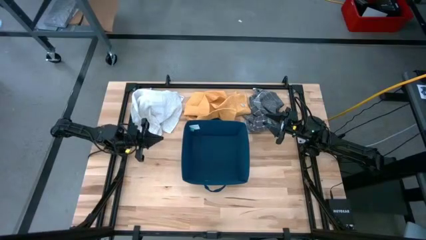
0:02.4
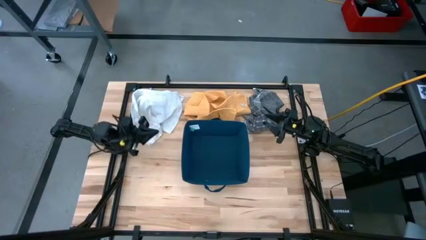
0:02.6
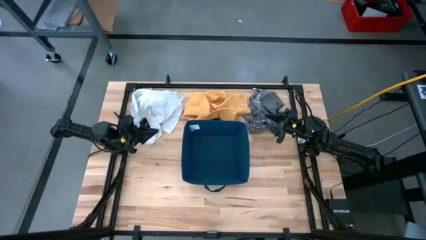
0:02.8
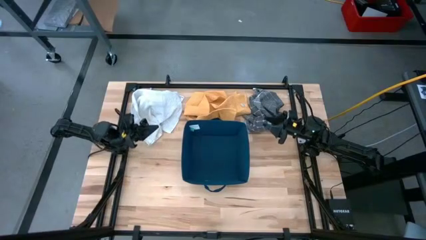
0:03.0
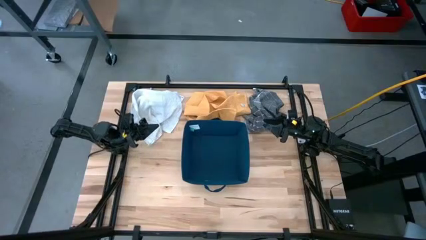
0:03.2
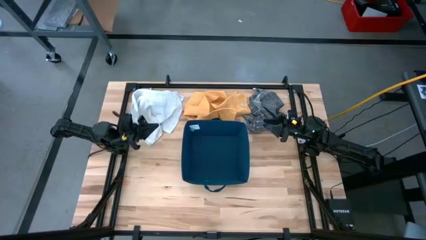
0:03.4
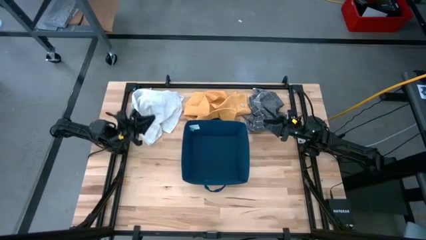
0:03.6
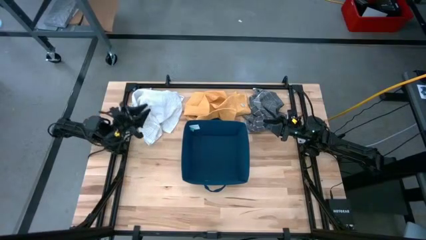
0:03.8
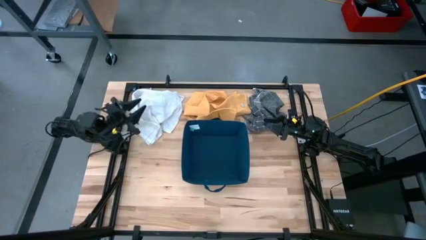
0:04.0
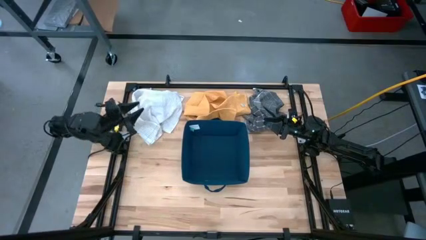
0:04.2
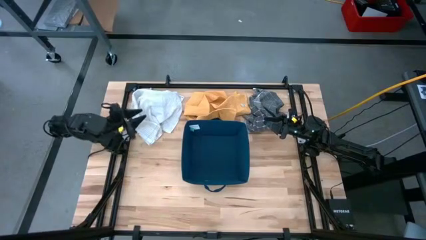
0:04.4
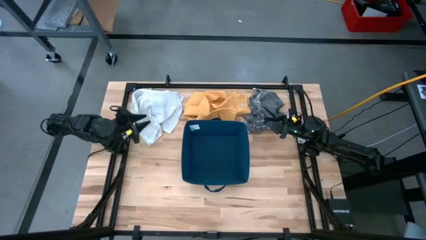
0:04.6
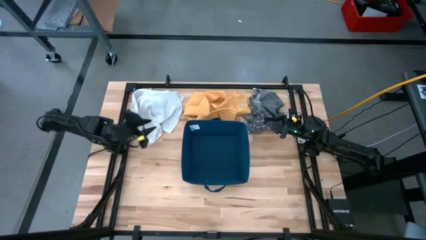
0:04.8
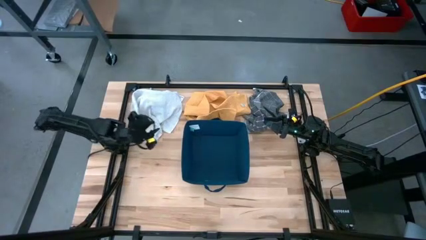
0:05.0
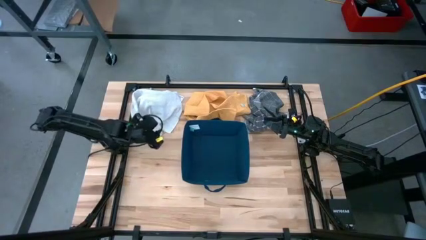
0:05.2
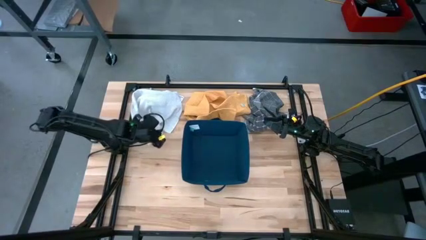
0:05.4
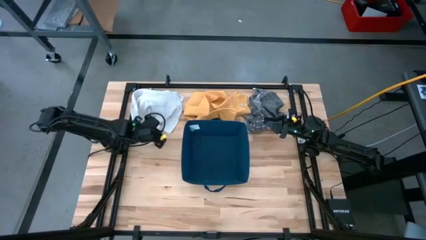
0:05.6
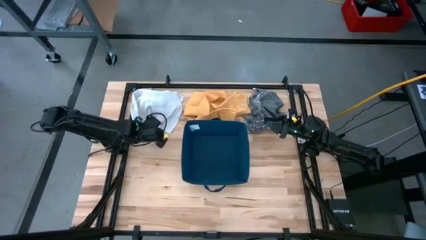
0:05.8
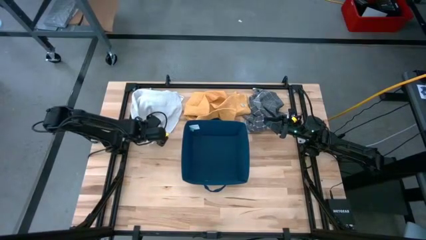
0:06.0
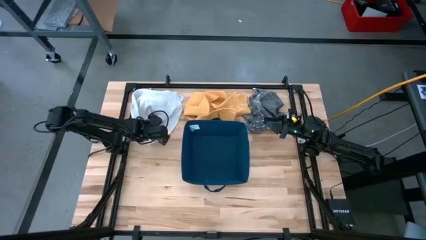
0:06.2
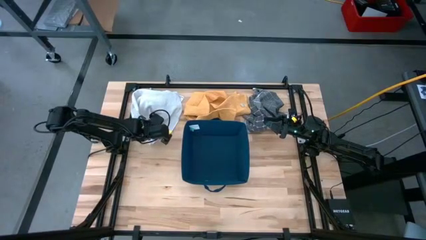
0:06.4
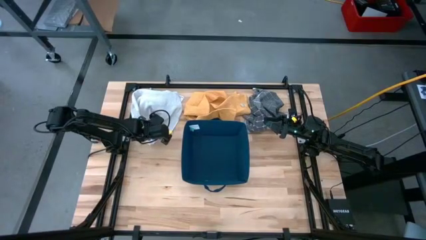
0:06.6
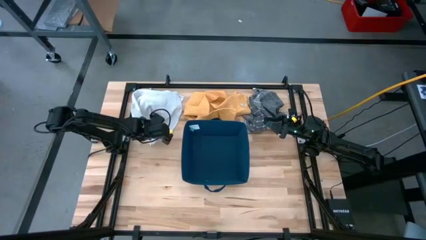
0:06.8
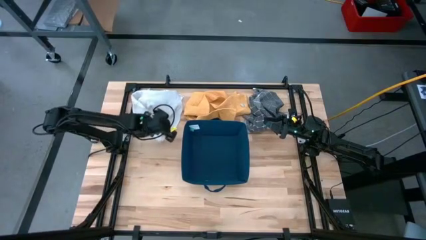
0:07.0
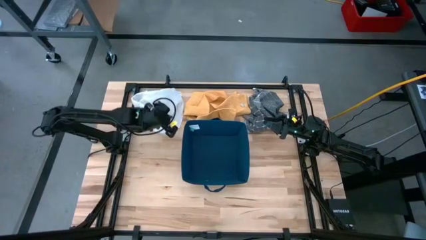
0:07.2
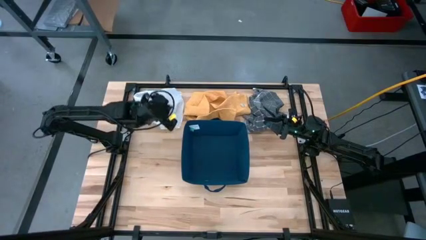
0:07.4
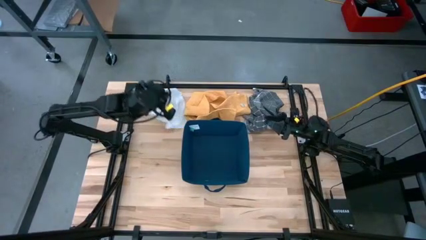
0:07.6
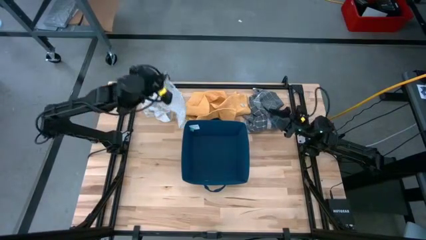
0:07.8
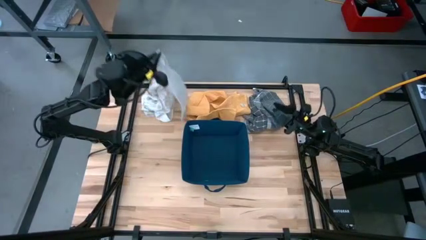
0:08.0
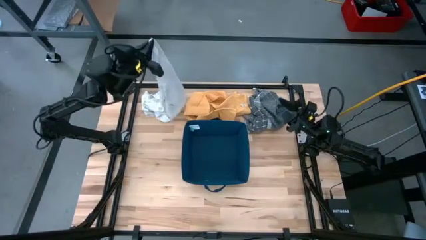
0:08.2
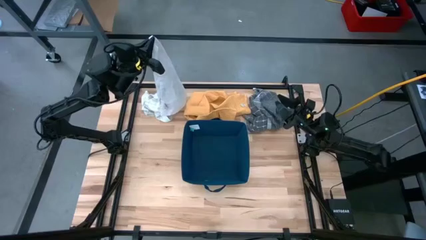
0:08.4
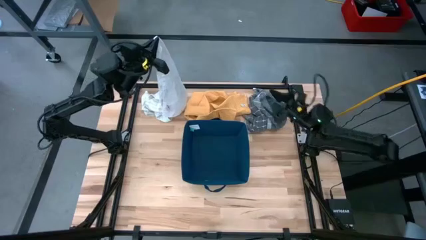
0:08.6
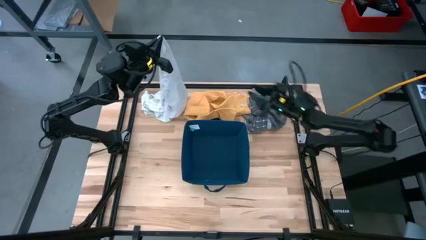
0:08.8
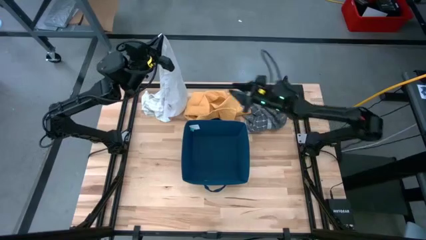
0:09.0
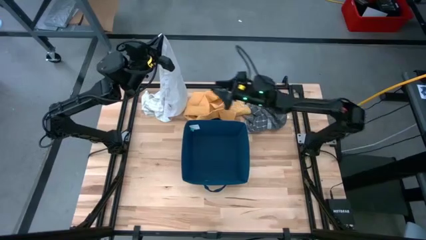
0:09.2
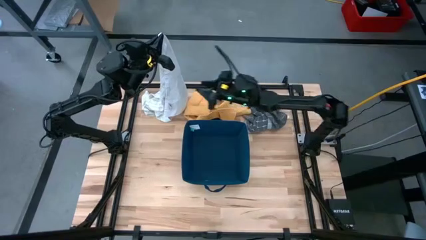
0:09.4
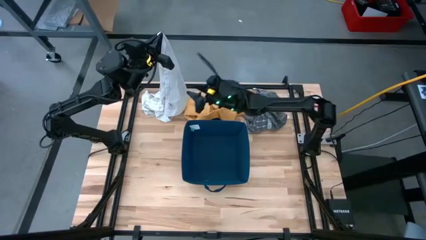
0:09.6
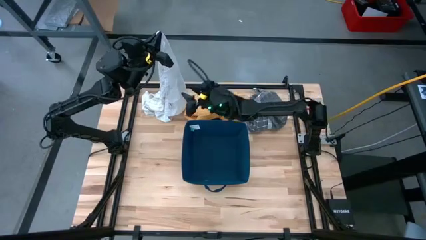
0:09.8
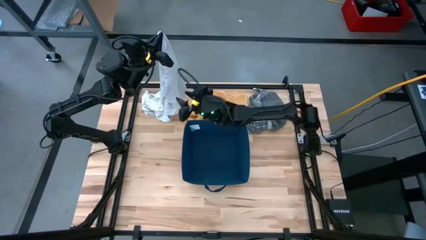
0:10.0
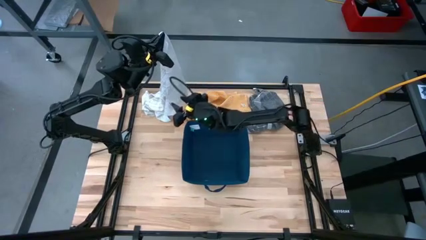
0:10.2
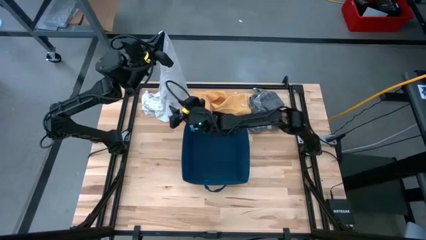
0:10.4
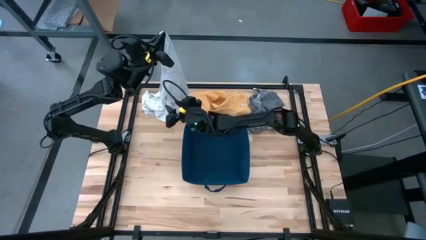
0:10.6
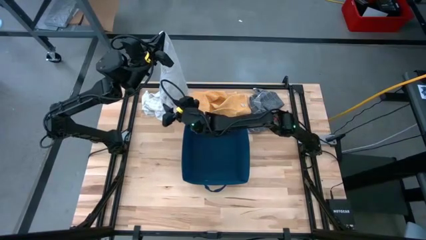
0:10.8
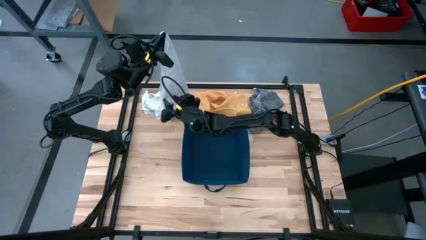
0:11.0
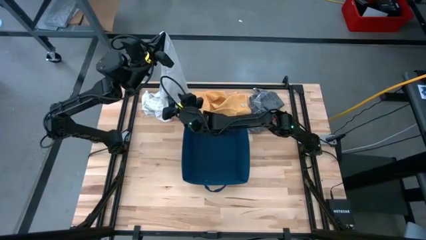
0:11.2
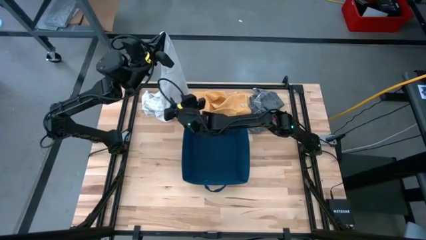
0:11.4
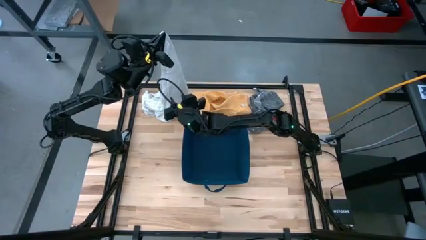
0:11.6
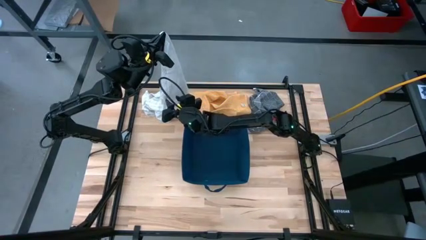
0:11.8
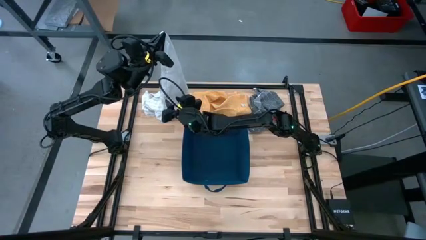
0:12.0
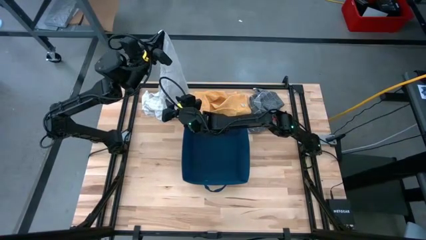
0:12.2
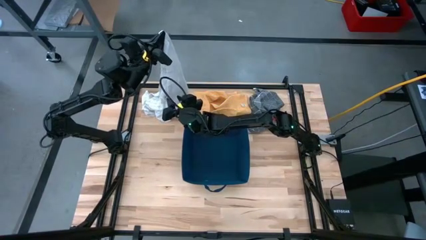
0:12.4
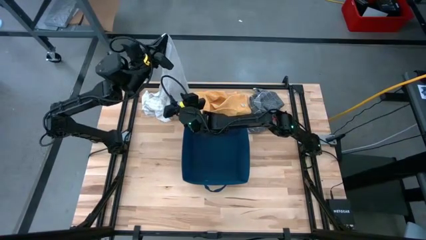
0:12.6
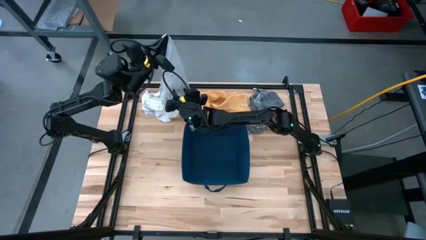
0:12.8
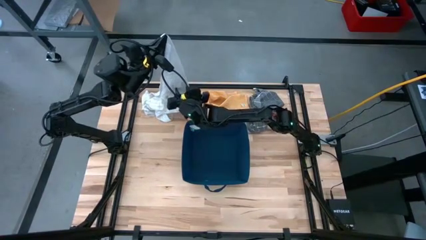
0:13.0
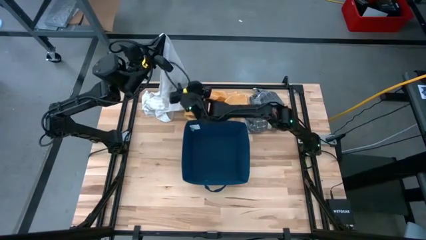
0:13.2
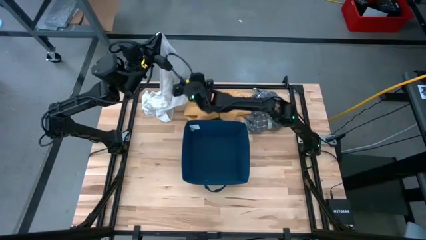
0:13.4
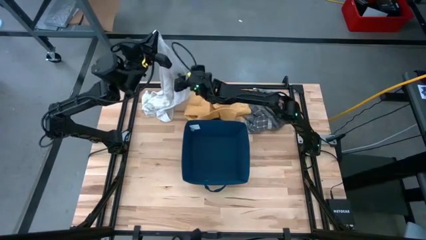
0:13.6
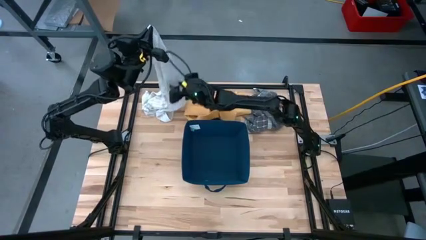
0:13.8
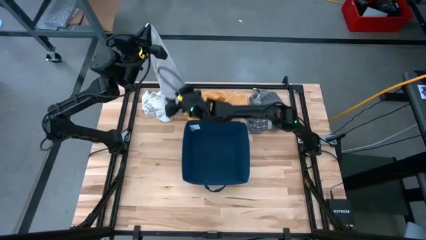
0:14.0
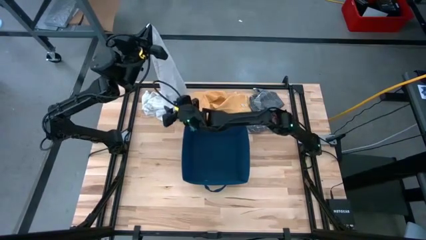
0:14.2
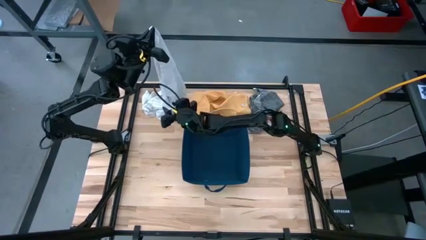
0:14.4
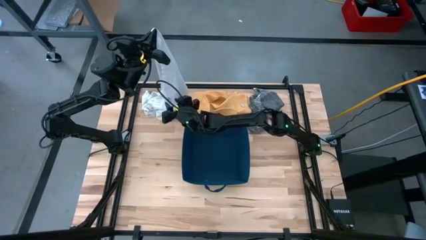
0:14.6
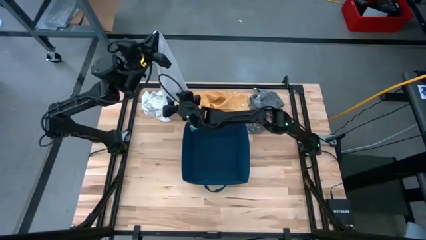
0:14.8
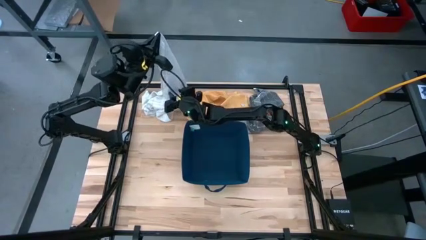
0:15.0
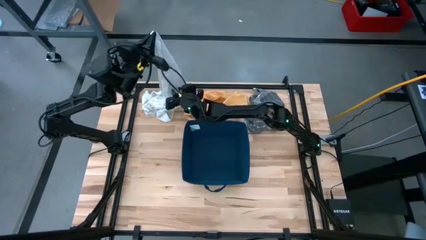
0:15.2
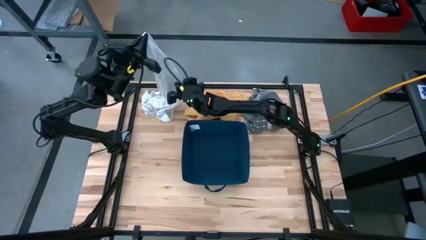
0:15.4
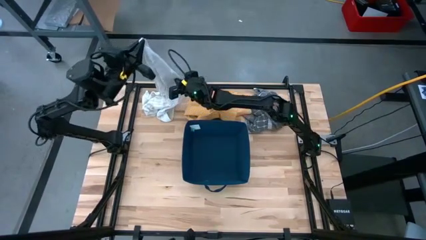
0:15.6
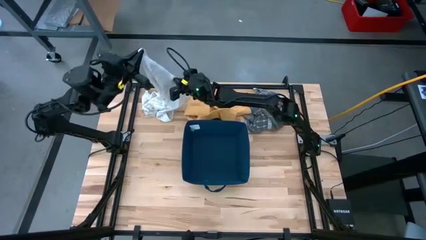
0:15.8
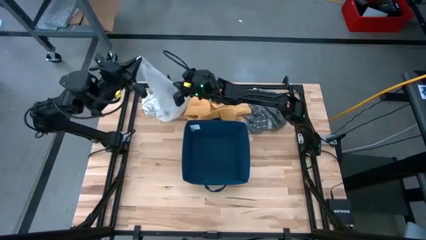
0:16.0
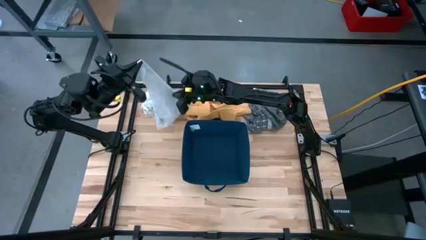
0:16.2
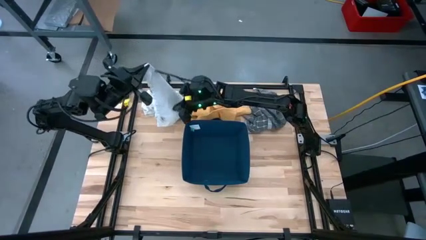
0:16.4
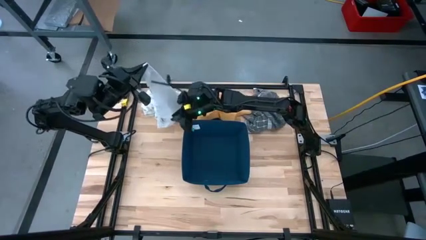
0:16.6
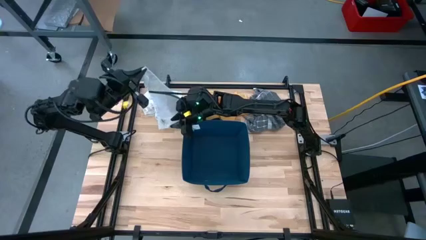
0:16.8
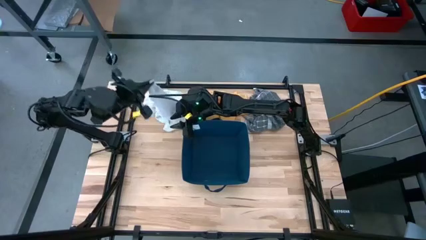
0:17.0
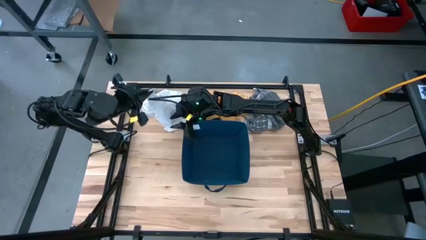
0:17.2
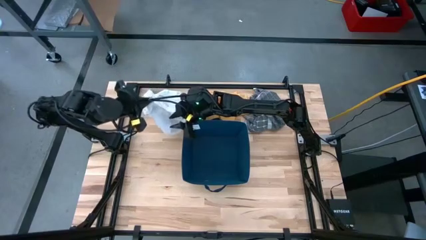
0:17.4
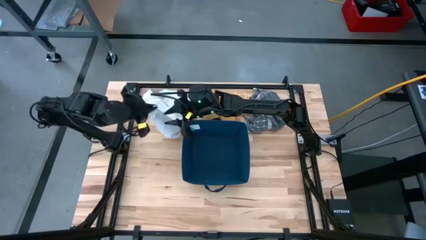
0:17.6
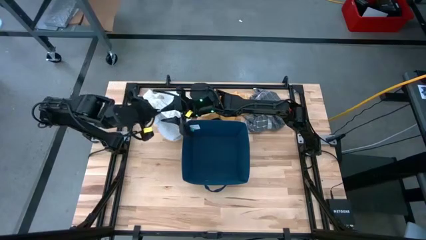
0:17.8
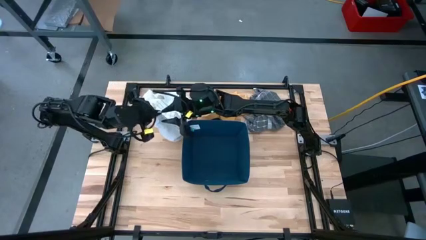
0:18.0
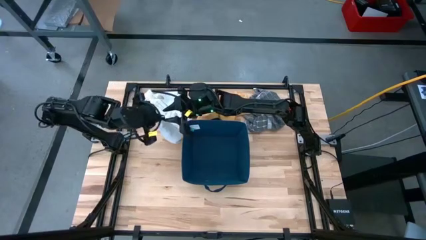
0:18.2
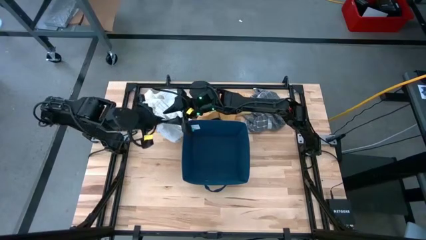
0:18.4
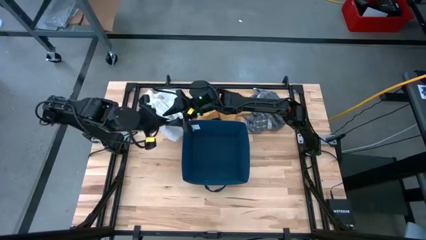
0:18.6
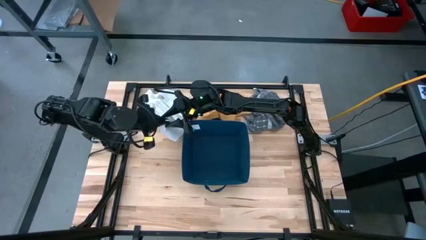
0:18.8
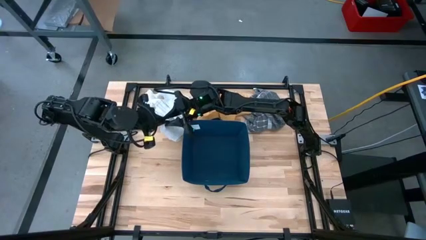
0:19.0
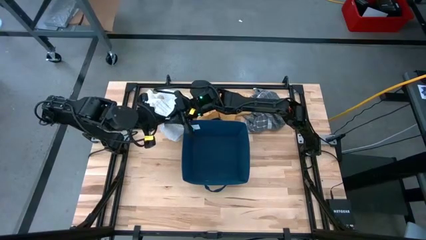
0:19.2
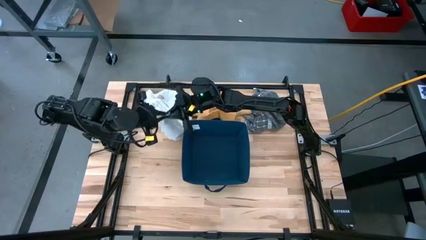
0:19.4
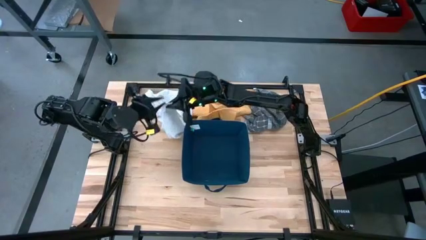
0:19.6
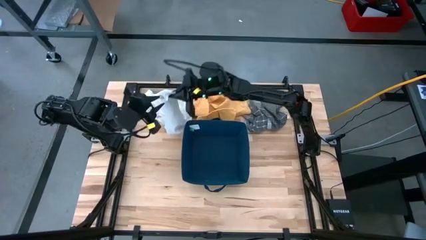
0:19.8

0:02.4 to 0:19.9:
Task: Fold towel
Fold the white towel
